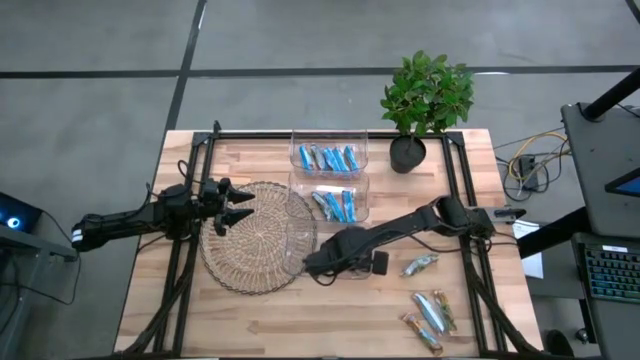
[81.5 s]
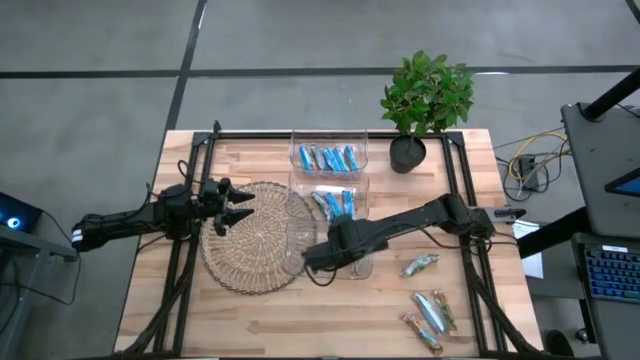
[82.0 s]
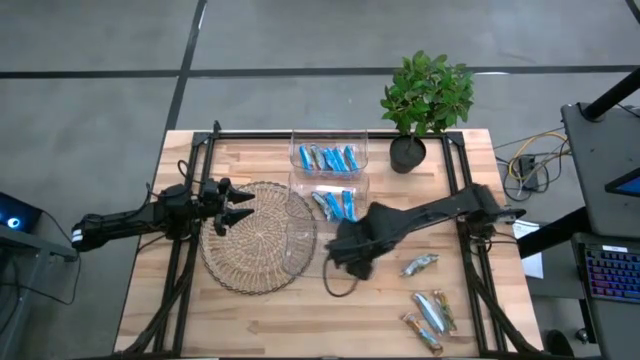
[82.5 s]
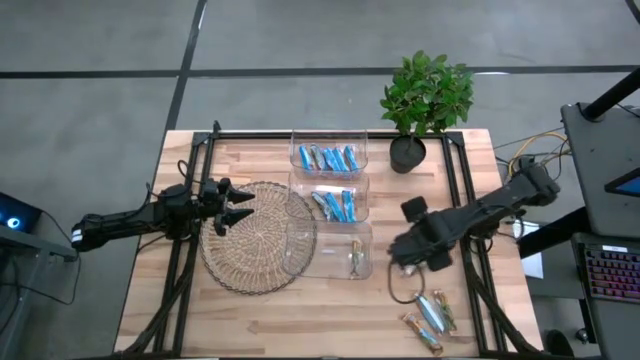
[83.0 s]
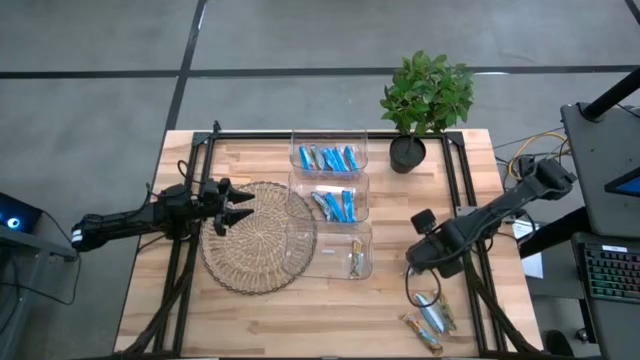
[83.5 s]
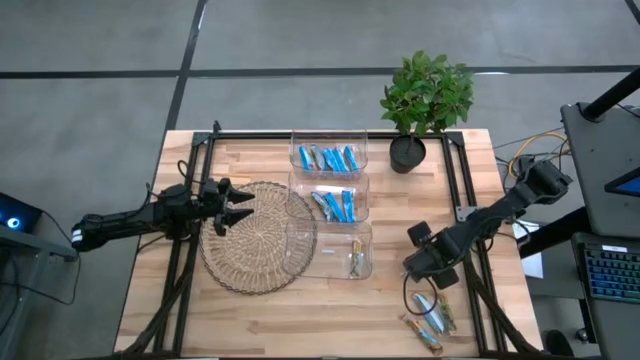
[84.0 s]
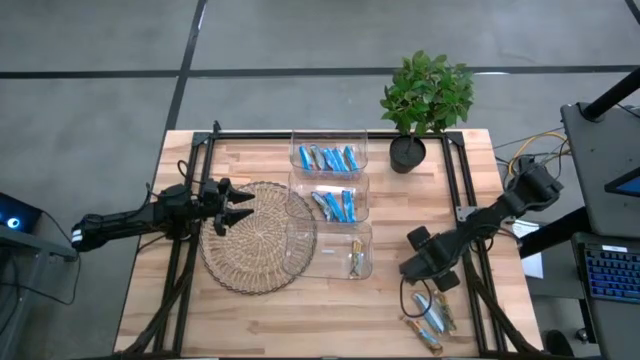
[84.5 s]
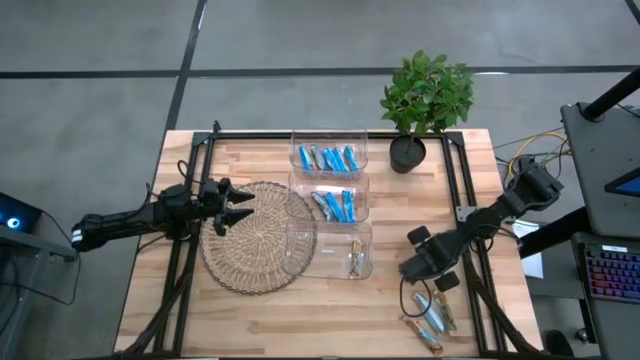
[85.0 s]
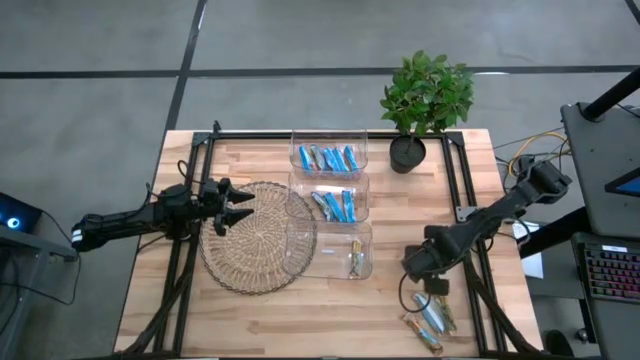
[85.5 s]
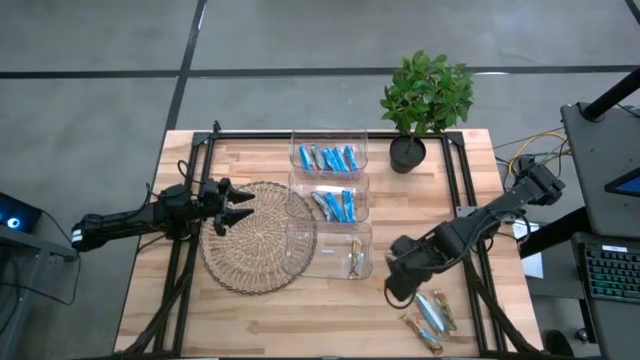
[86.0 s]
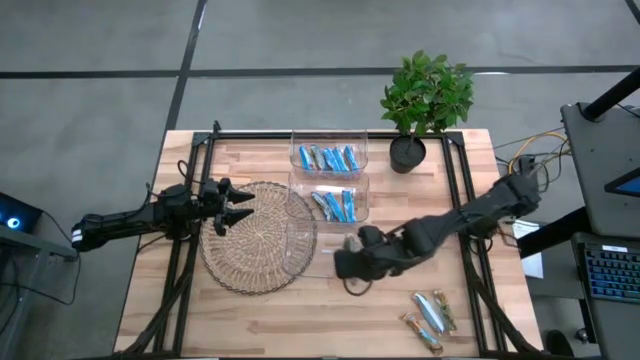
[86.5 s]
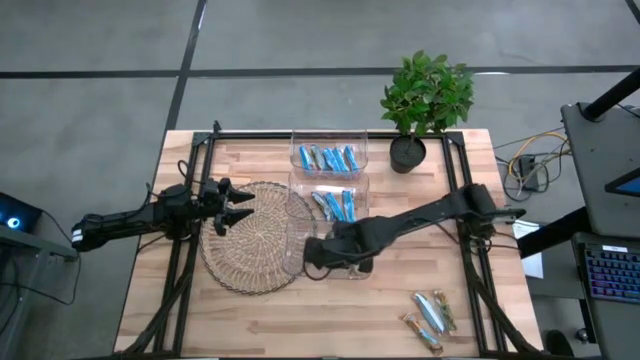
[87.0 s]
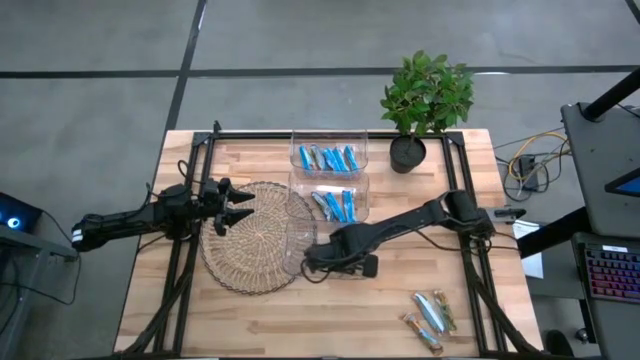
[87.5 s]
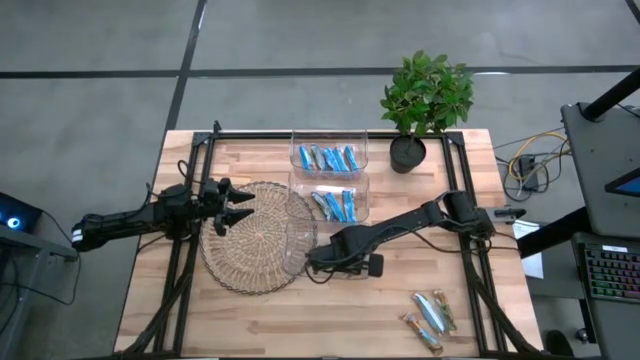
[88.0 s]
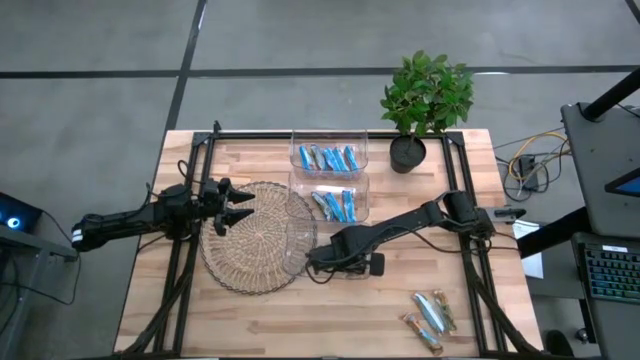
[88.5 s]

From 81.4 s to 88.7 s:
Task: Pick and place Granola Bars by type
Put the yellow granola bar into the bottom transparent bin

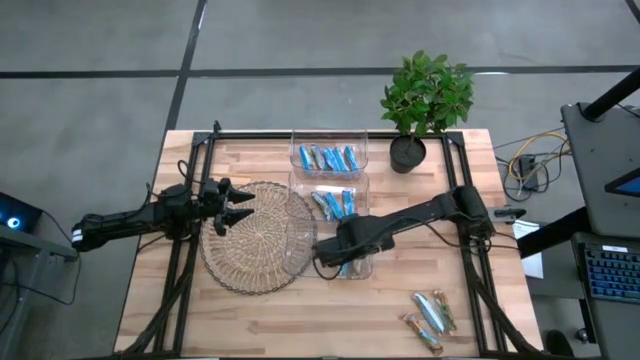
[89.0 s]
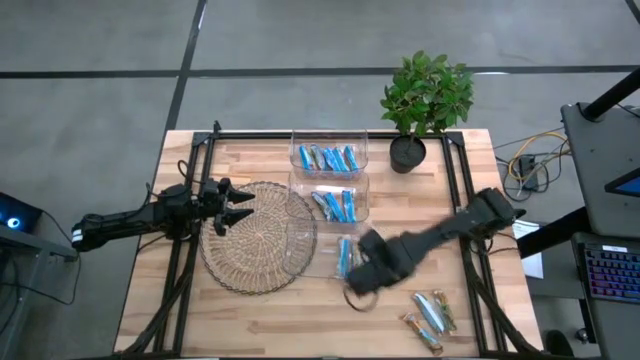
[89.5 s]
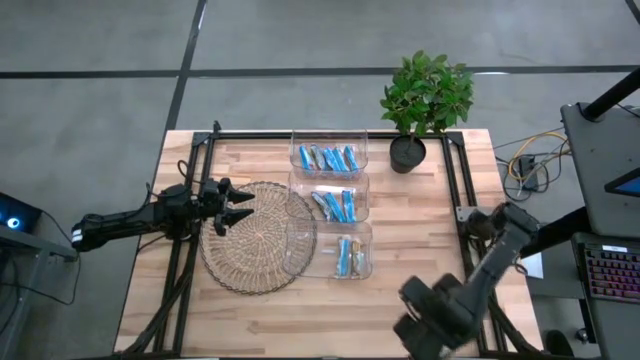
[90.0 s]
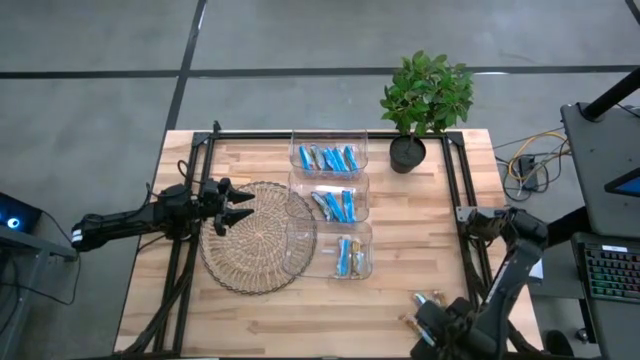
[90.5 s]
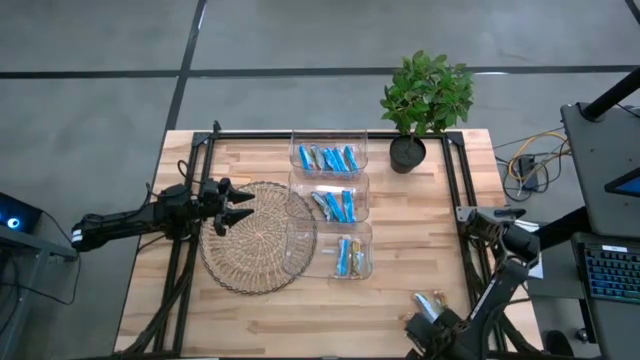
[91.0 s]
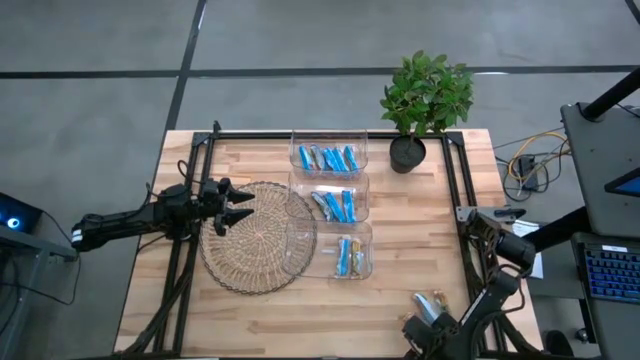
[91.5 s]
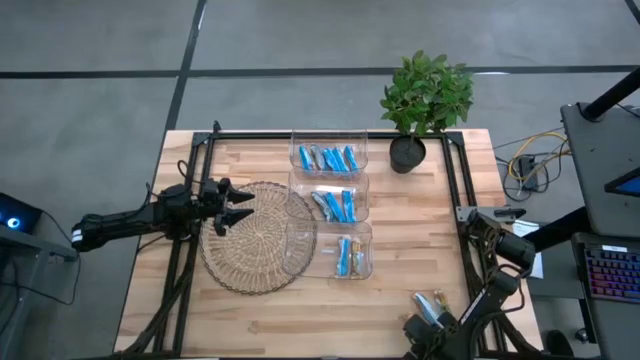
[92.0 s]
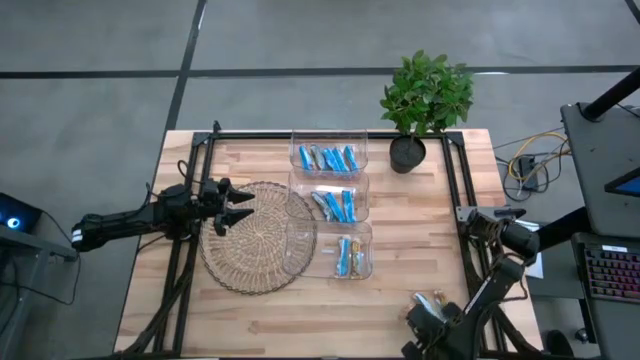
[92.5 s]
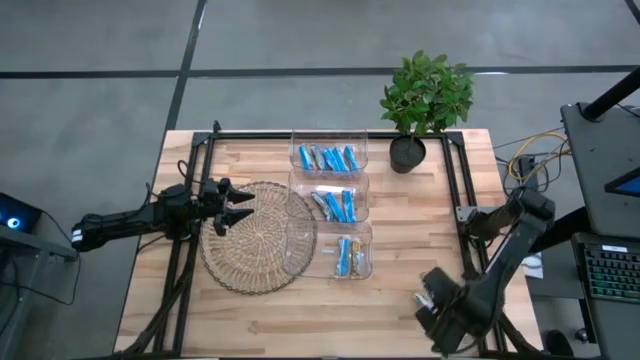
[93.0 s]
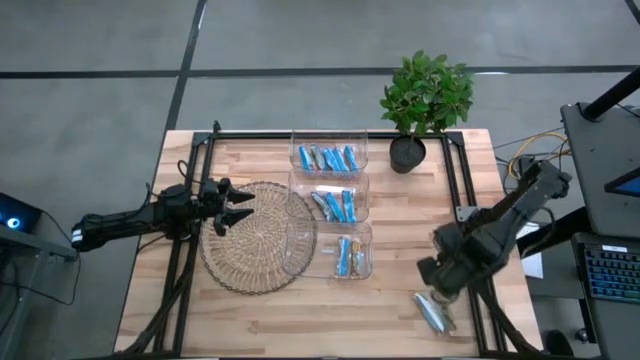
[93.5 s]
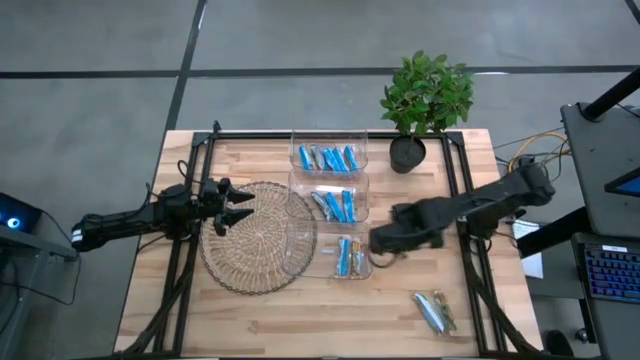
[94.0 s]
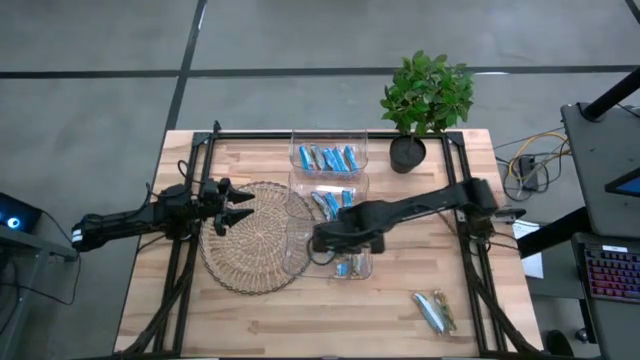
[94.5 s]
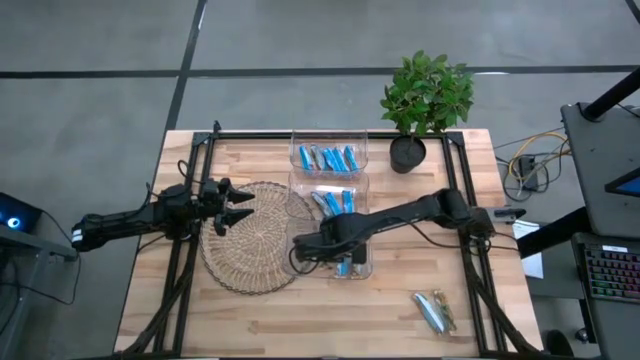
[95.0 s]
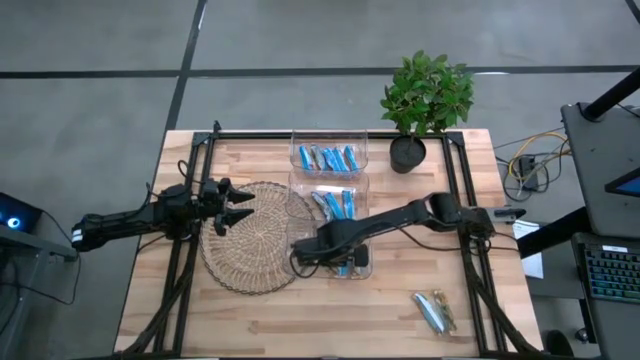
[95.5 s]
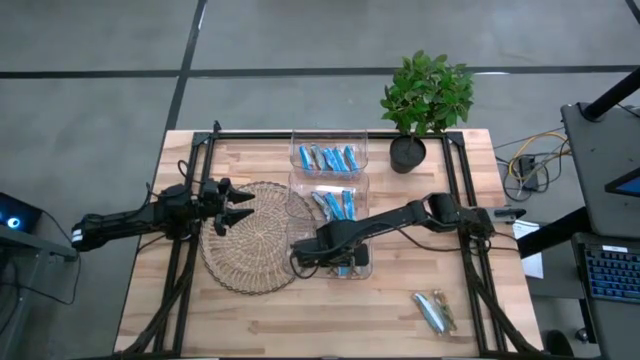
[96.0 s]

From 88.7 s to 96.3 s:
Put the yellow granola bar into the bottom transparent bin

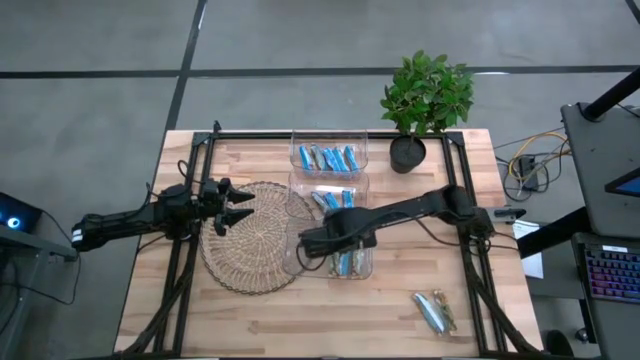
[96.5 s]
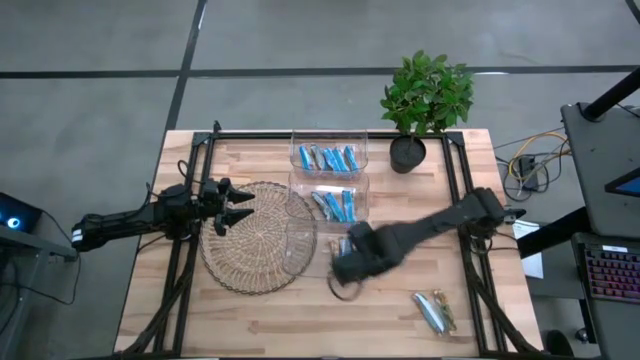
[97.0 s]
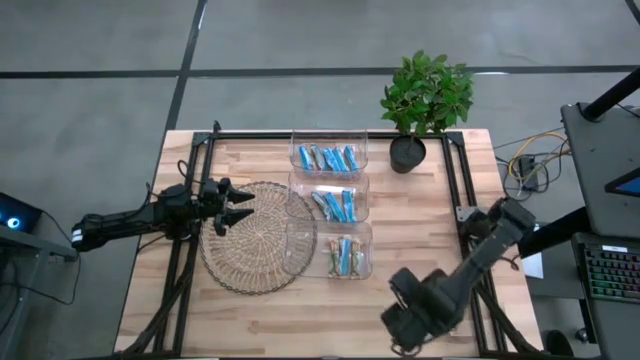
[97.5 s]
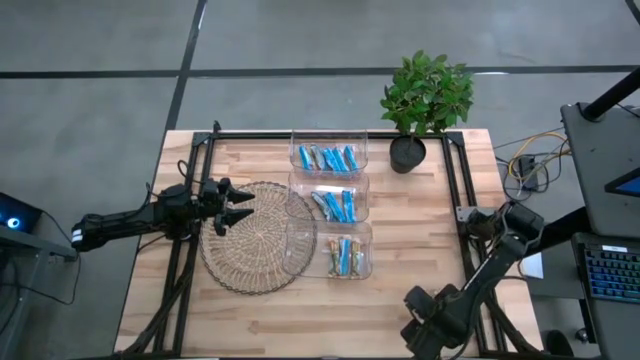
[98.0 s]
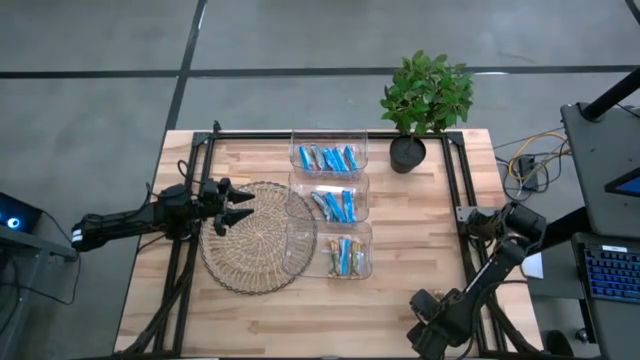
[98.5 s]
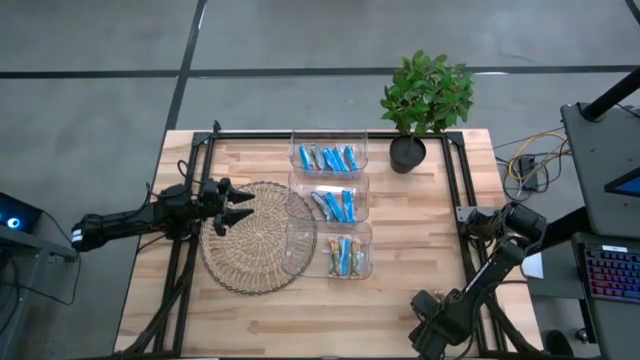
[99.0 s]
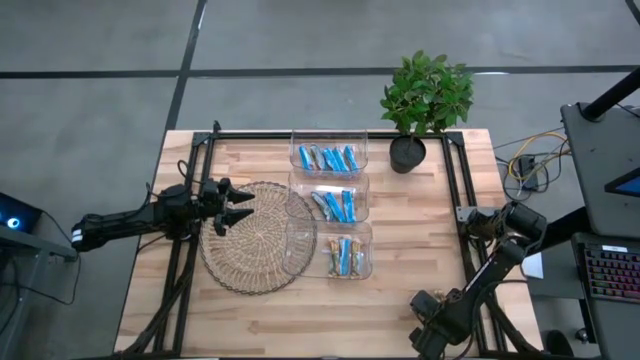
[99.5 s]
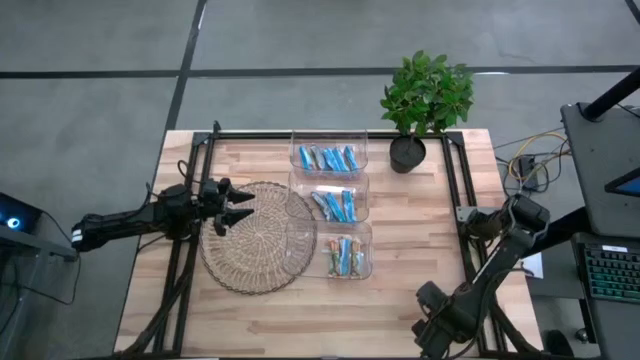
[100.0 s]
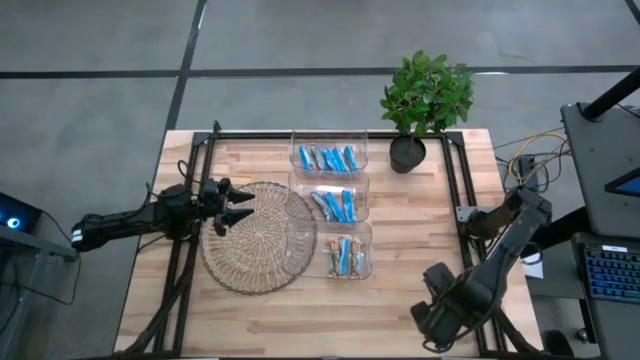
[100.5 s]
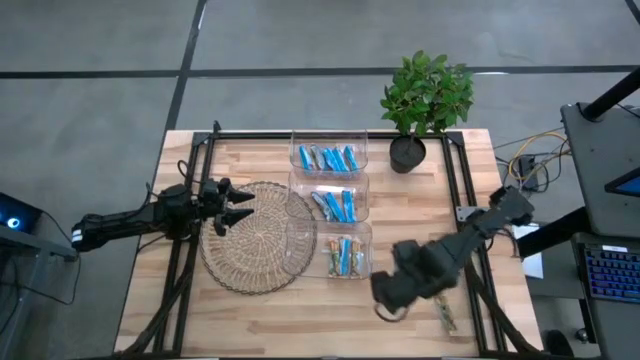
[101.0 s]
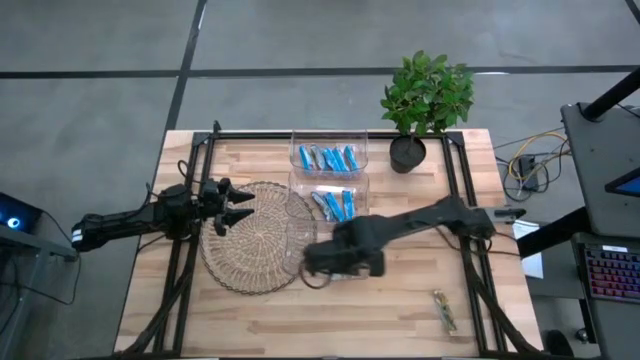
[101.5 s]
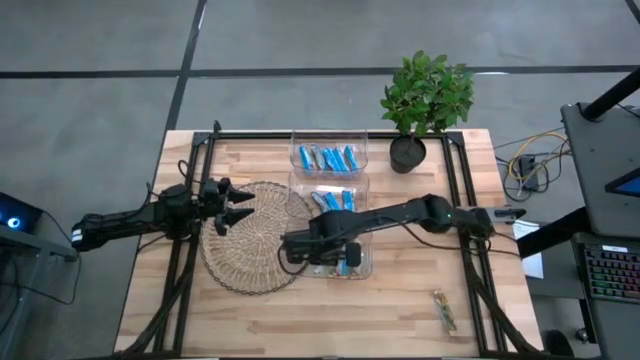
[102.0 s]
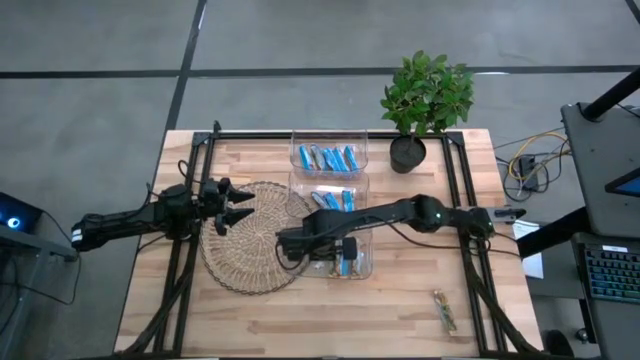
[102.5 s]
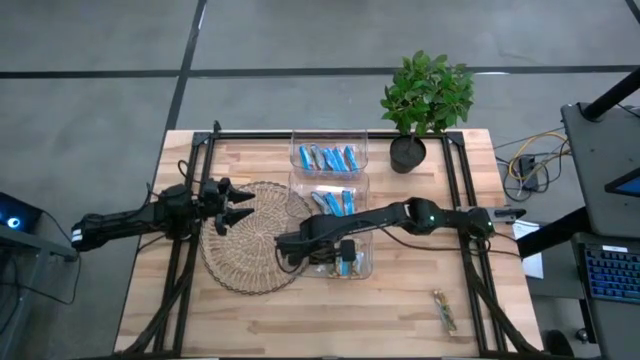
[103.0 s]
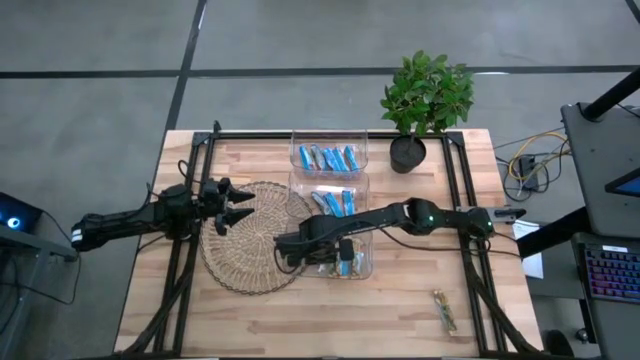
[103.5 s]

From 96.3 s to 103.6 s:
Put the yellow granola bar into the bottom transparent bin
